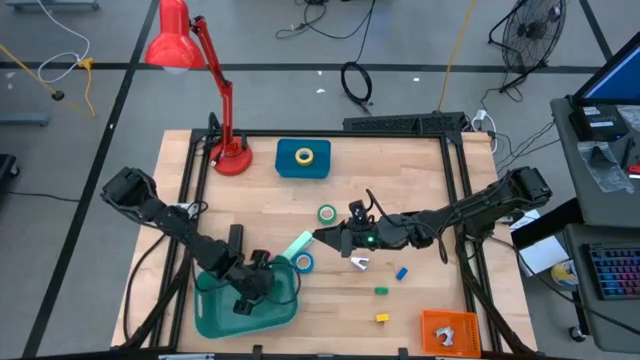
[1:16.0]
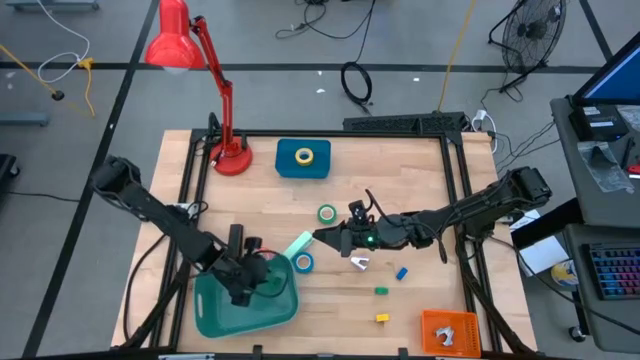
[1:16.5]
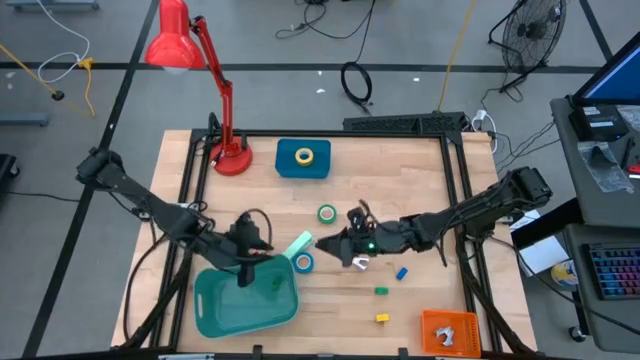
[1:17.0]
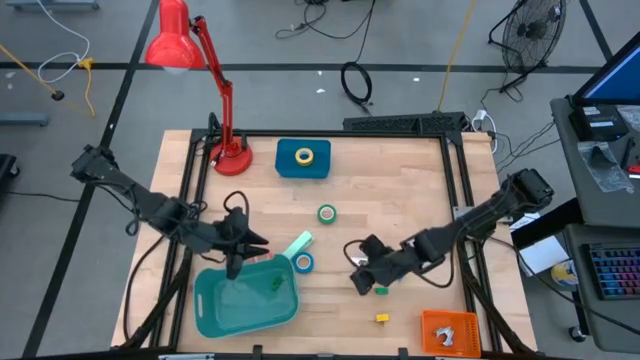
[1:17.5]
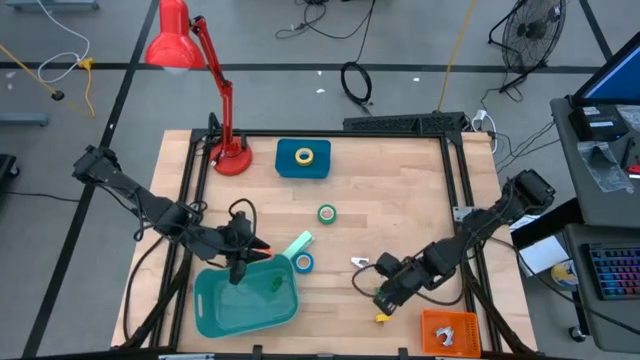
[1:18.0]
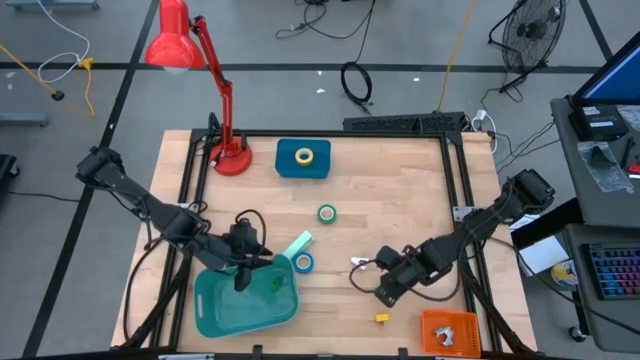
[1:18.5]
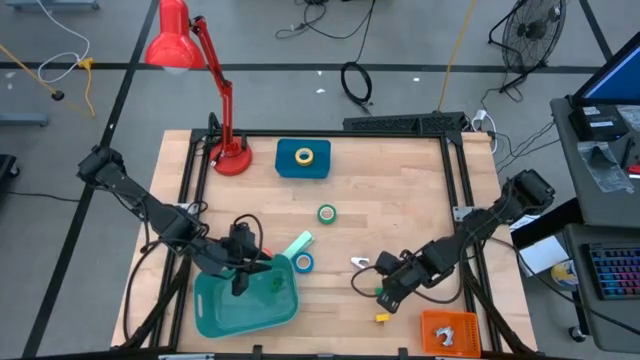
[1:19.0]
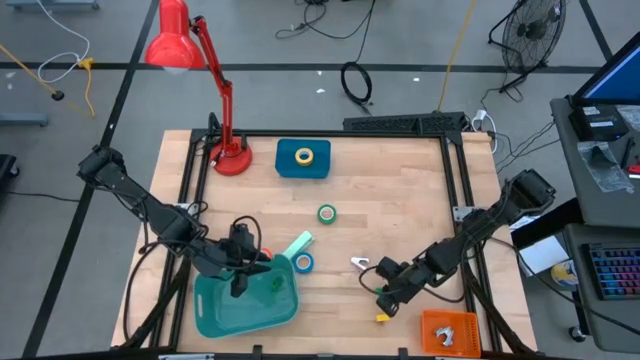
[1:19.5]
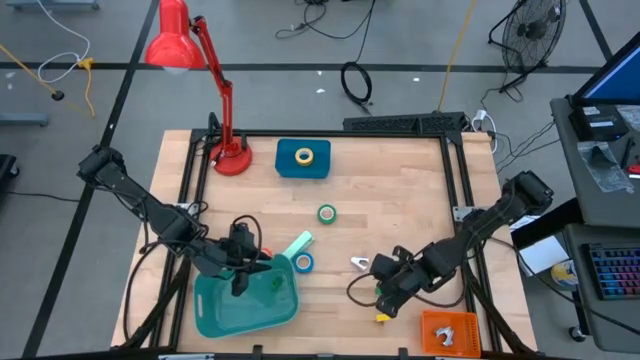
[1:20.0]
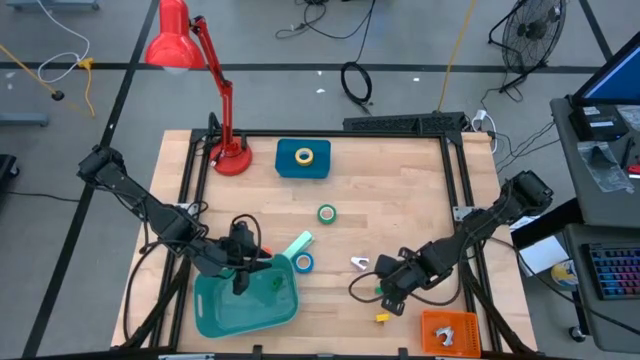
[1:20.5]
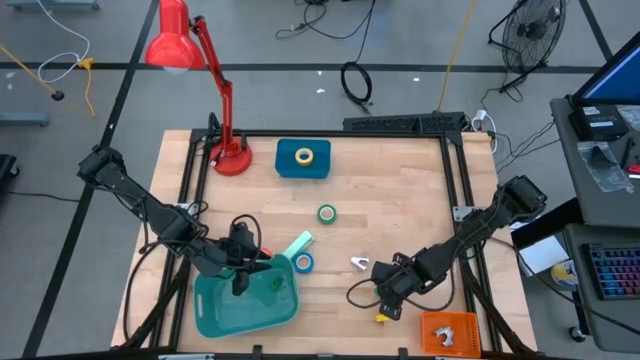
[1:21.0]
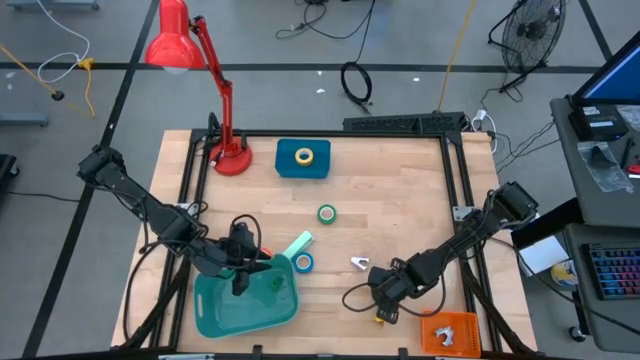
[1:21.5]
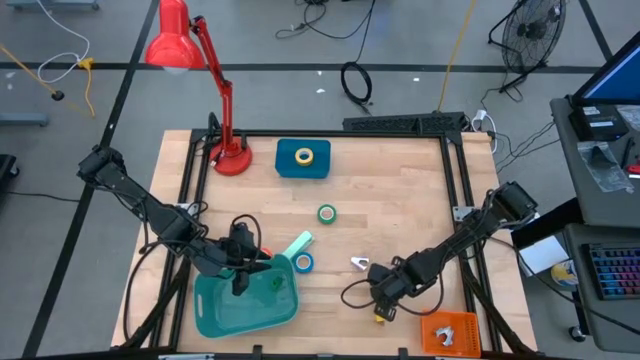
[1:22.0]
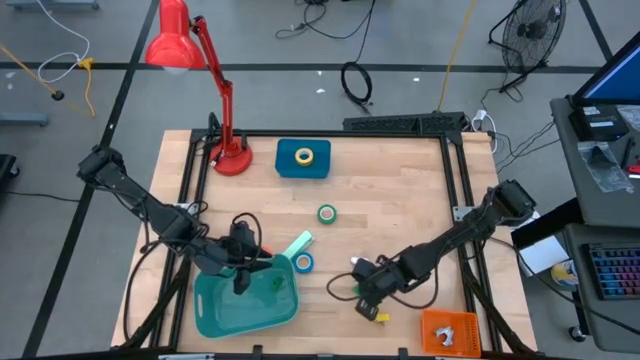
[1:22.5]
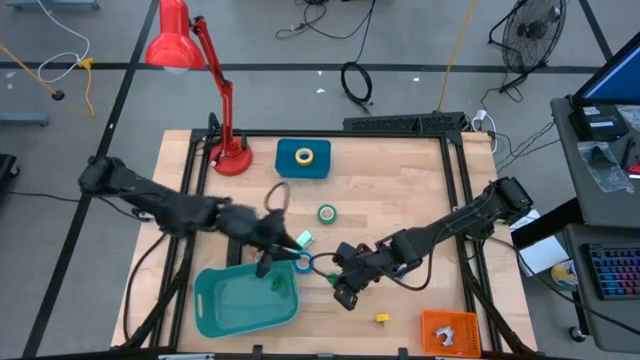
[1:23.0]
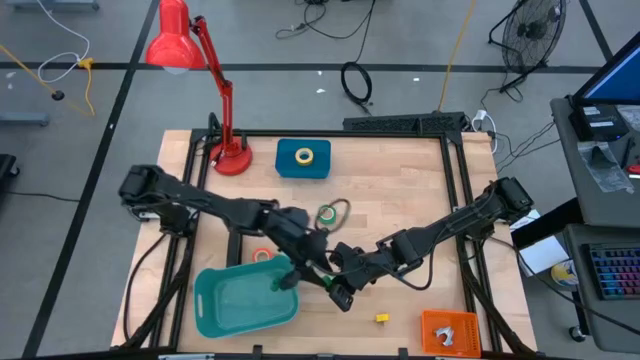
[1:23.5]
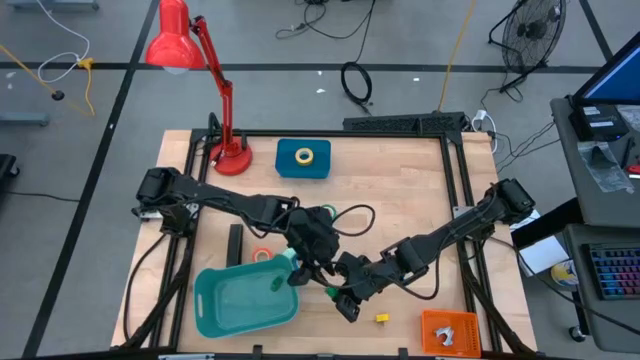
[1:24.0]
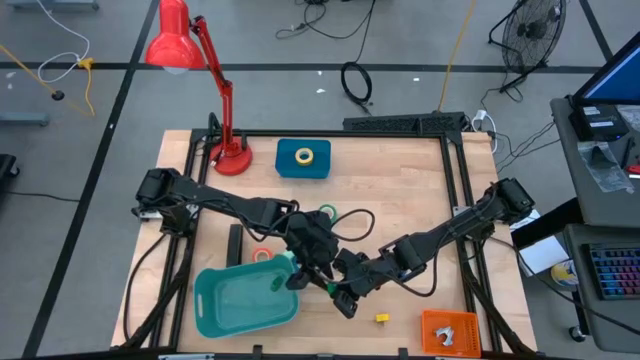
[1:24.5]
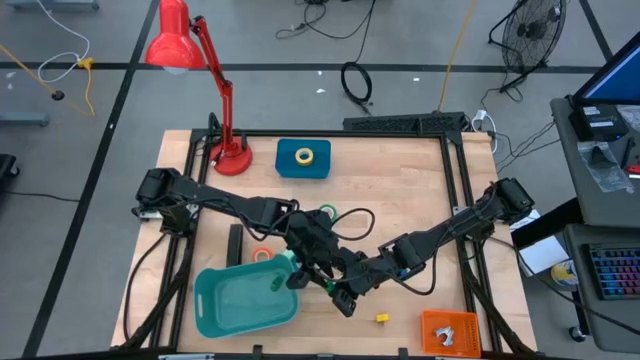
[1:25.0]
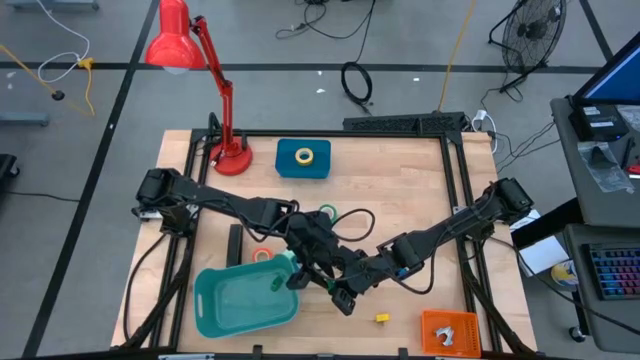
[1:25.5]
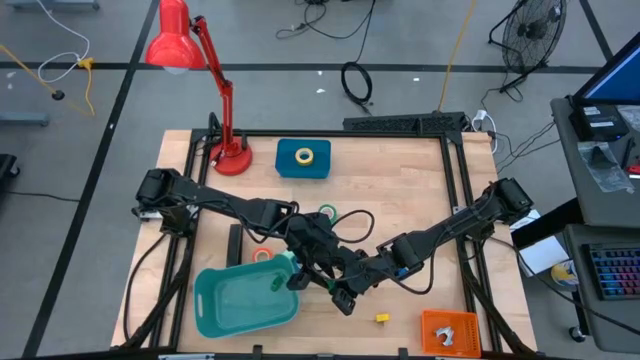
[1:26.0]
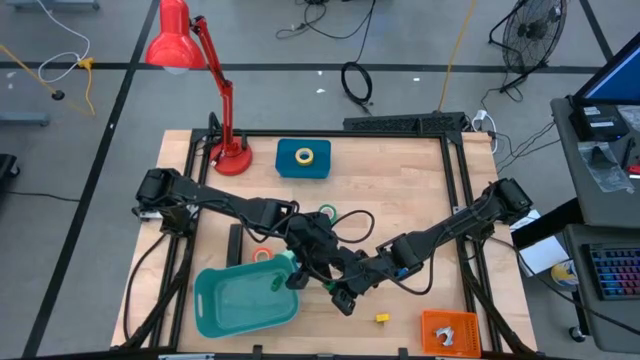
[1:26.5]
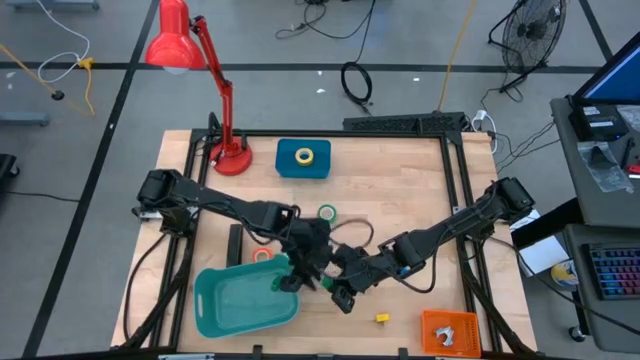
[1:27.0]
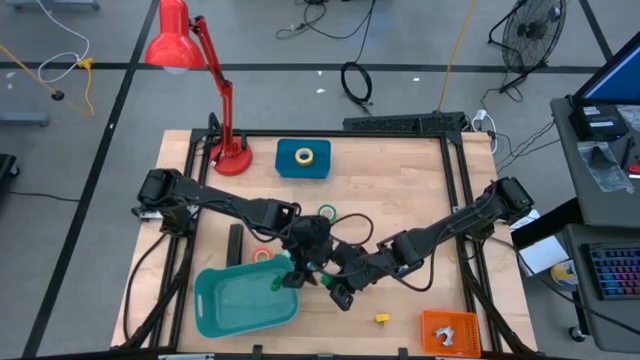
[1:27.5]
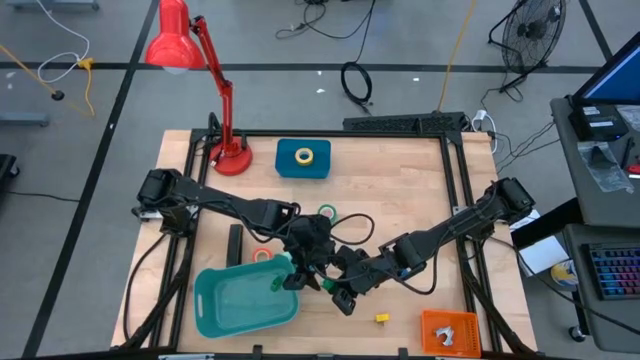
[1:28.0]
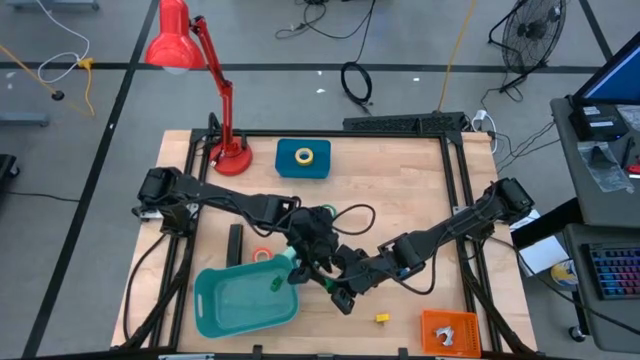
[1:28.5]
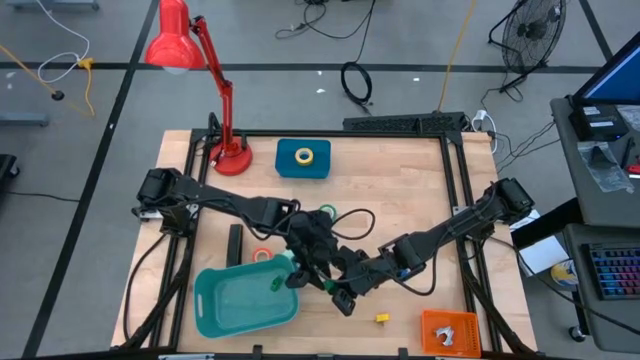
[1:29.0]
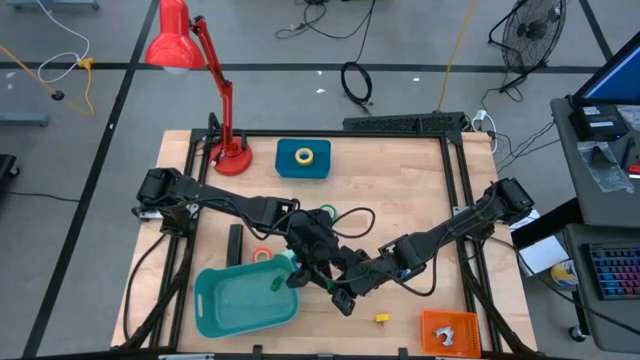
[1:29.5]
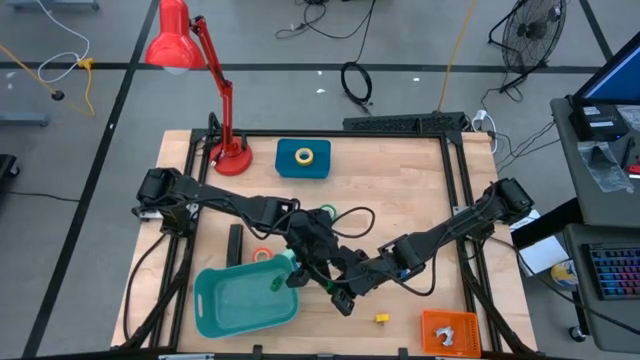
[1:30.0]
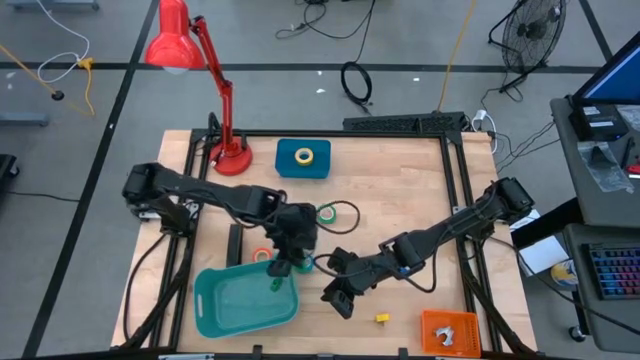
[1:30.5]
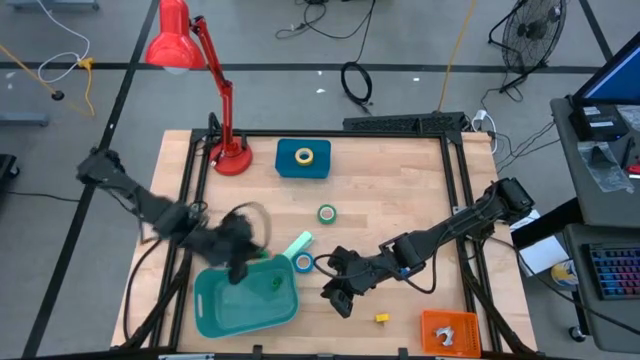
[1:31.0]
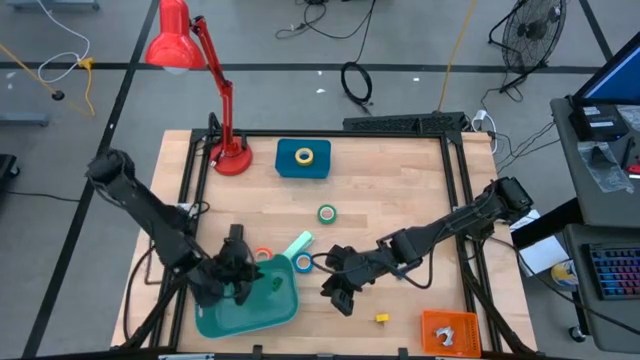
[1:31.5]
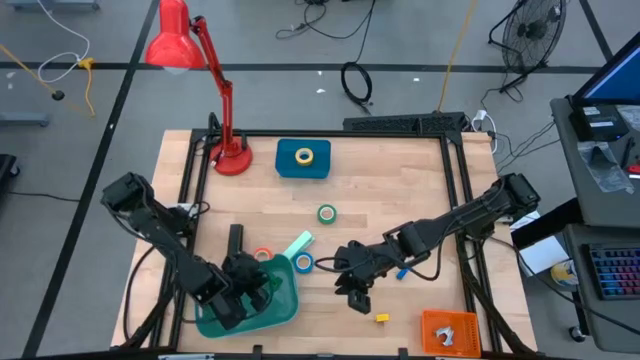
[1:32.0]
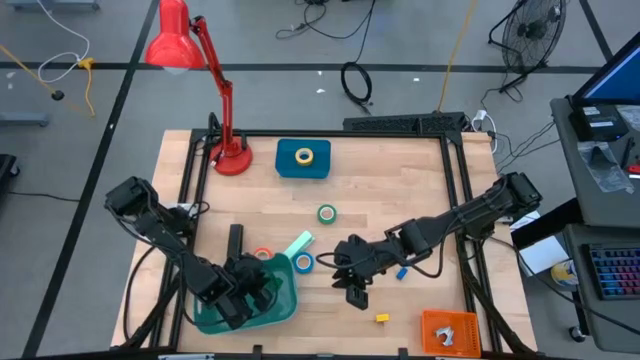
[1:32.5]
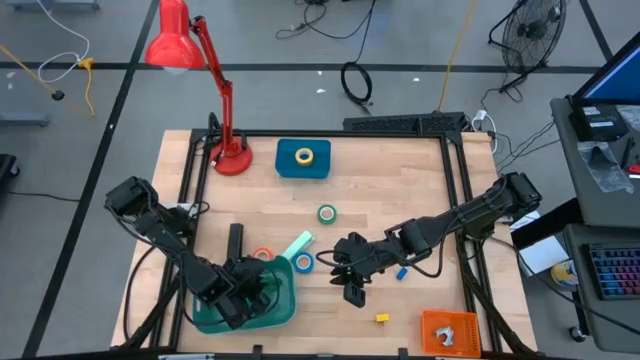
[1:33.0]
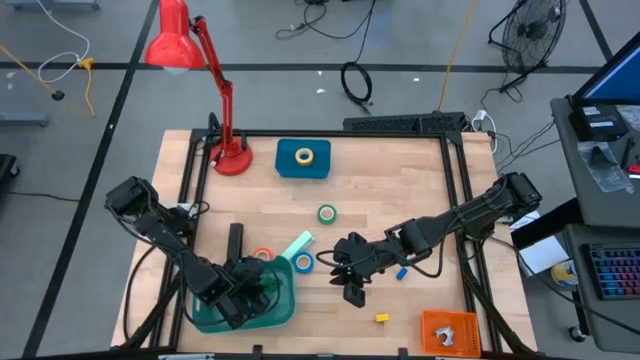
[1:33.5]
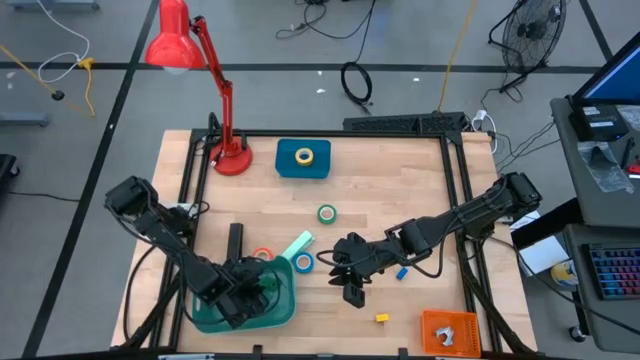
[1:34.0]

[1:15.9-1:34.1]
Task: Pick and place Stapler, Stapler remover, tape
Put the green stapler into the green bin

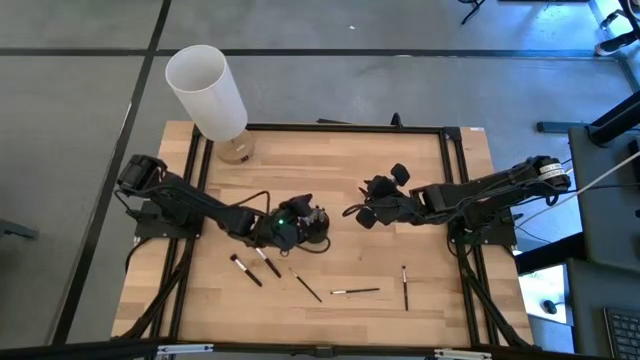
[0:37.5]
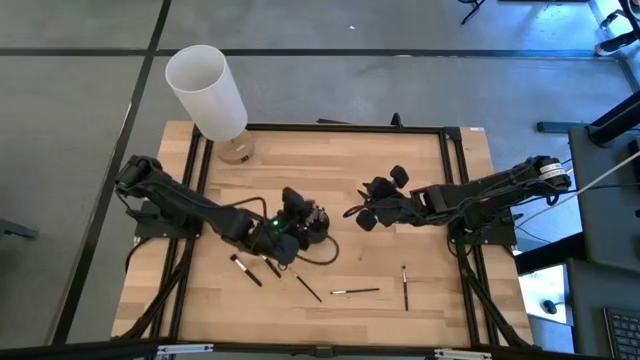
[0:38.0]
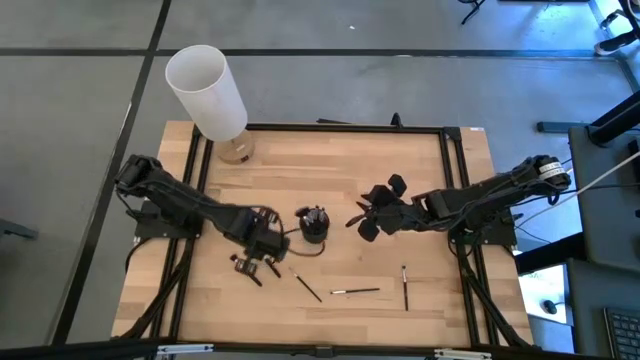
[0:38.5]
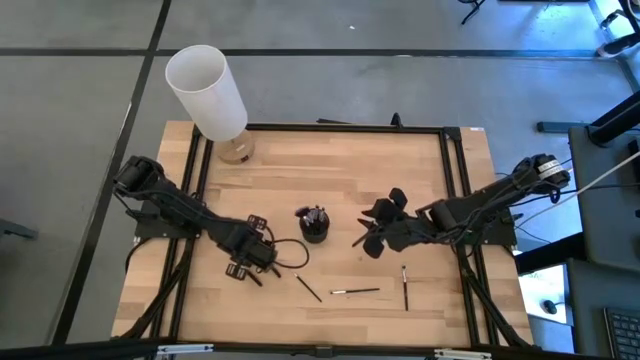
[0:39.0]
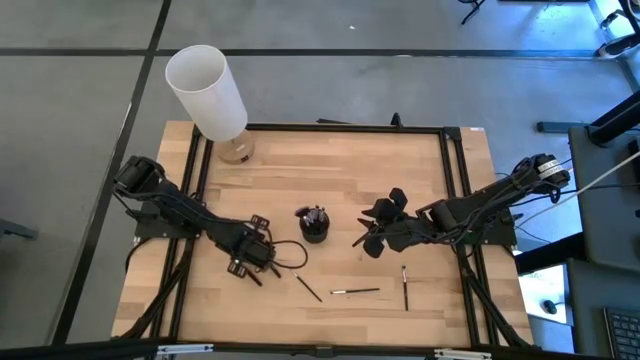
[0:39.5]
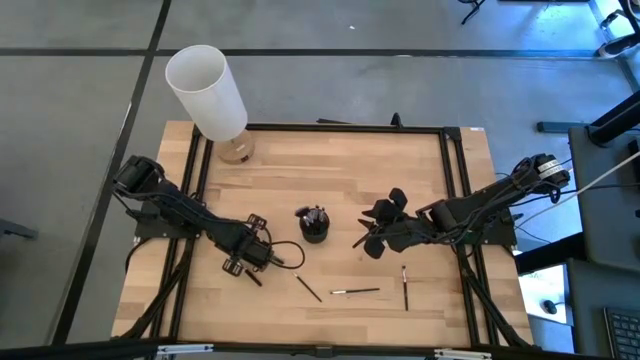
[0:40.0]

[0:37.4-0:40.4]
Task: Sort items
Put the silver blush brush into the pen holder
